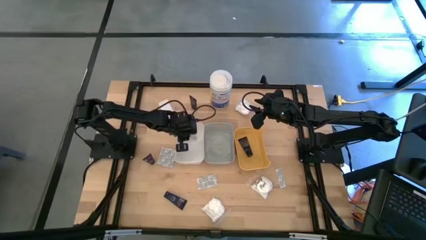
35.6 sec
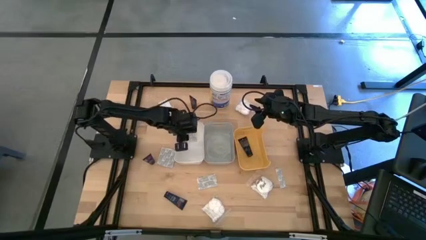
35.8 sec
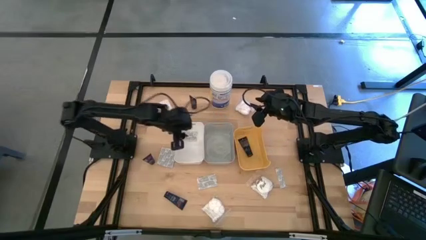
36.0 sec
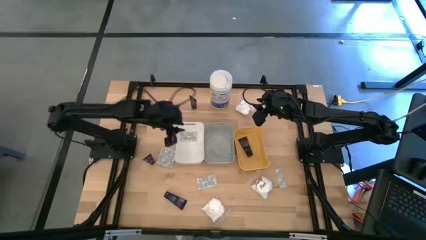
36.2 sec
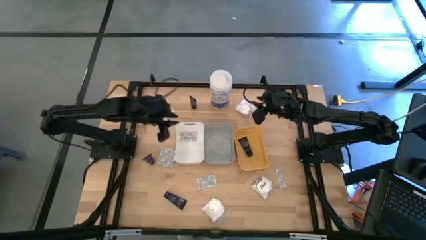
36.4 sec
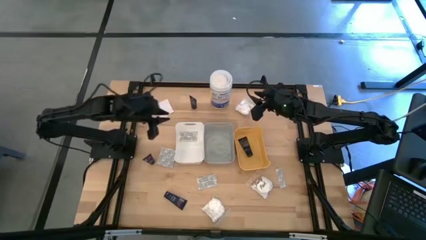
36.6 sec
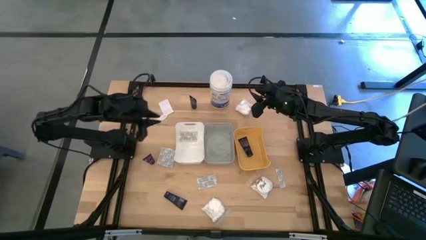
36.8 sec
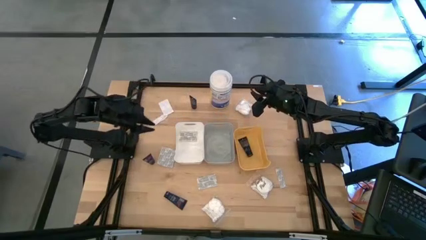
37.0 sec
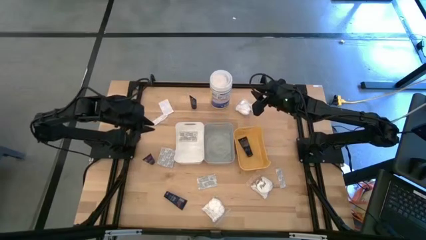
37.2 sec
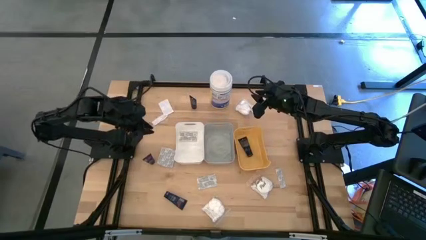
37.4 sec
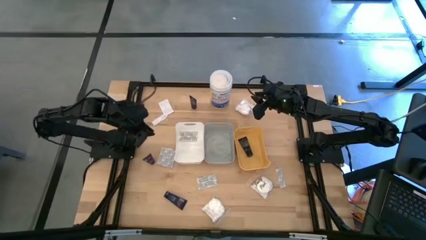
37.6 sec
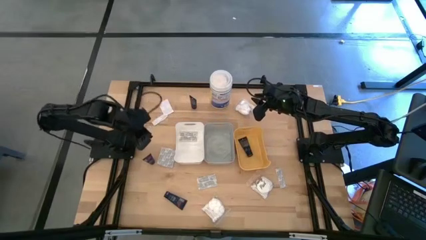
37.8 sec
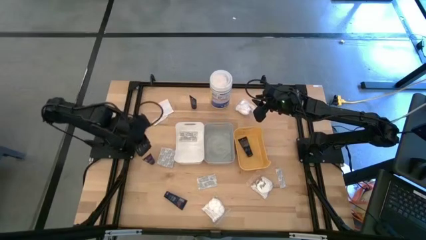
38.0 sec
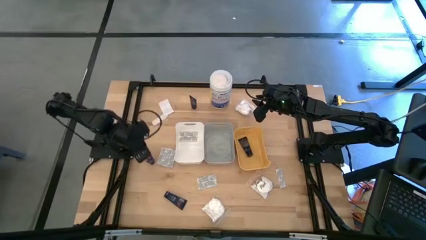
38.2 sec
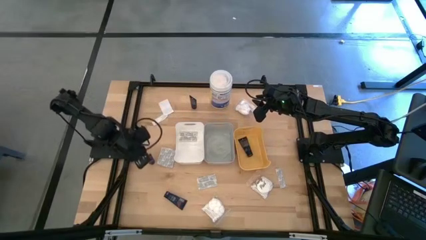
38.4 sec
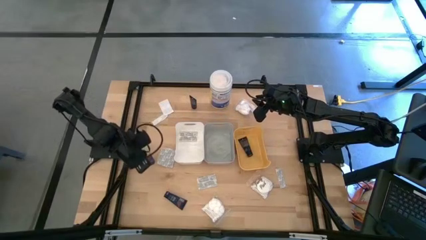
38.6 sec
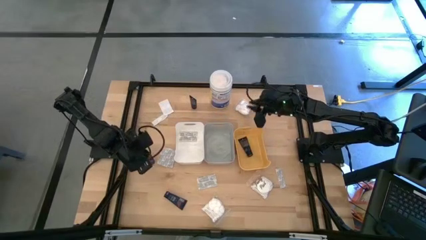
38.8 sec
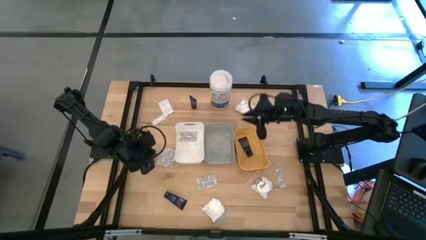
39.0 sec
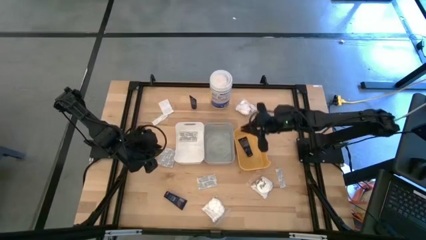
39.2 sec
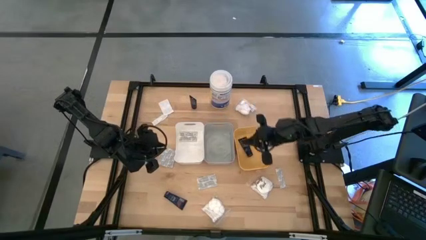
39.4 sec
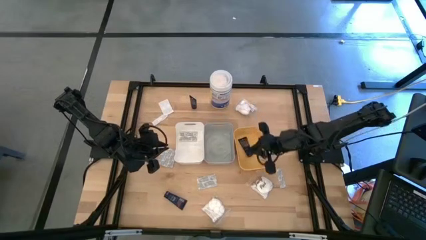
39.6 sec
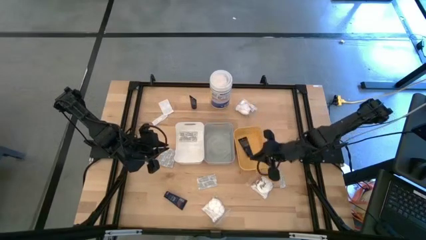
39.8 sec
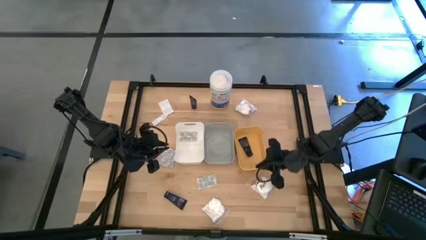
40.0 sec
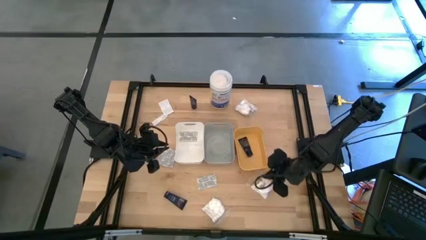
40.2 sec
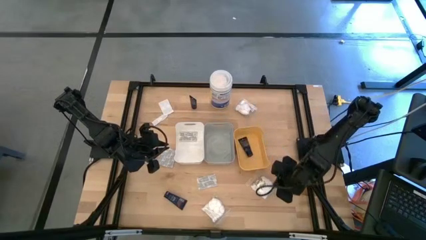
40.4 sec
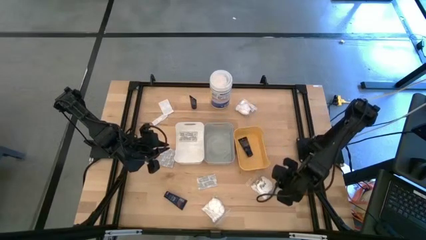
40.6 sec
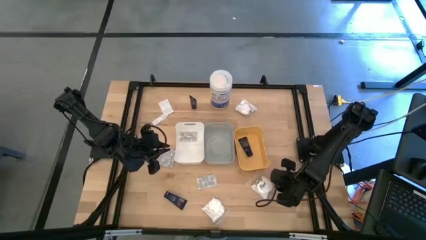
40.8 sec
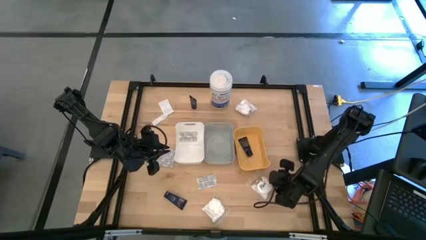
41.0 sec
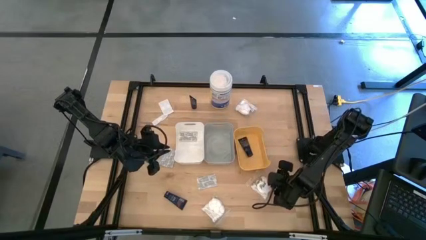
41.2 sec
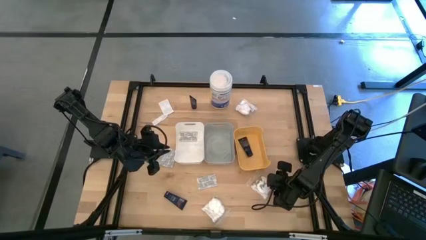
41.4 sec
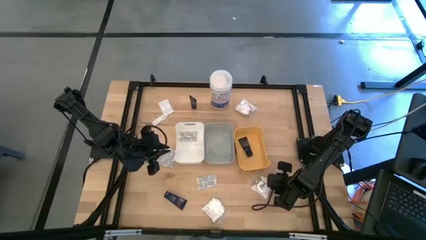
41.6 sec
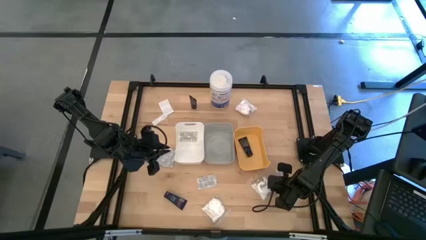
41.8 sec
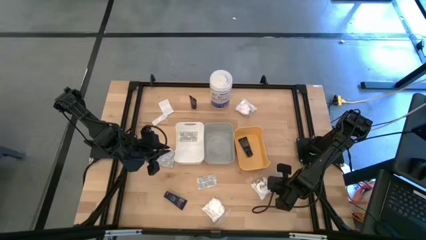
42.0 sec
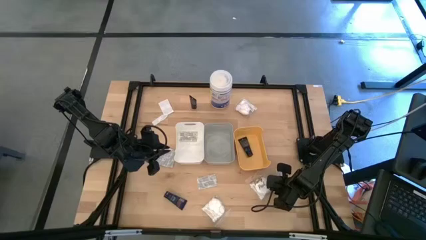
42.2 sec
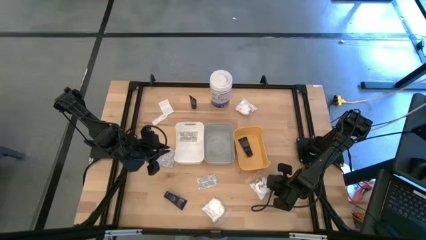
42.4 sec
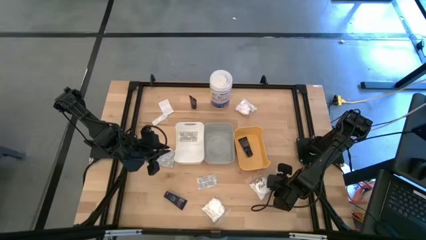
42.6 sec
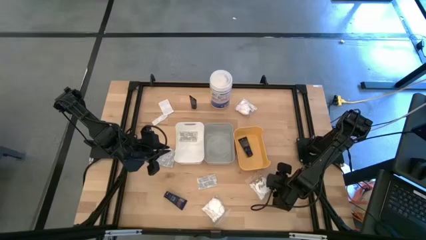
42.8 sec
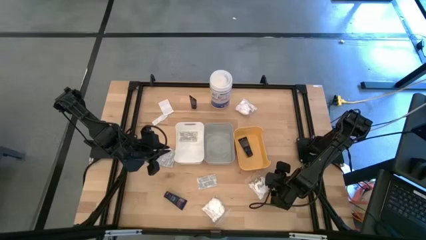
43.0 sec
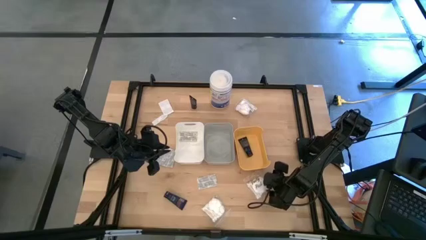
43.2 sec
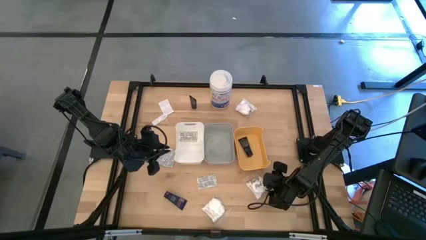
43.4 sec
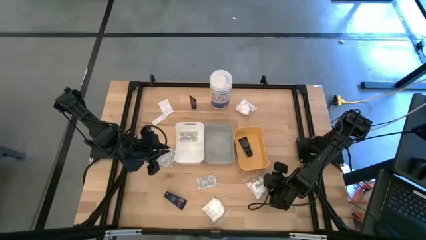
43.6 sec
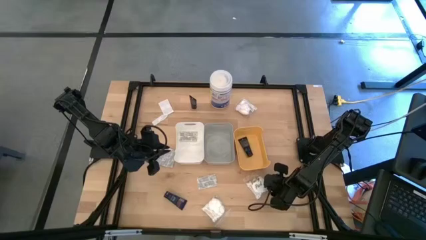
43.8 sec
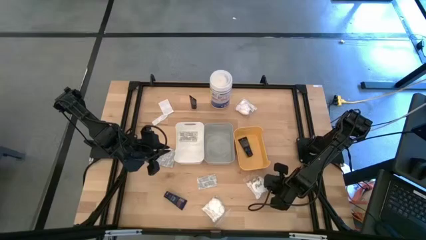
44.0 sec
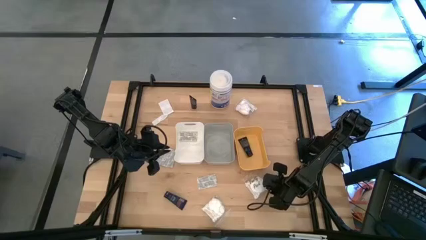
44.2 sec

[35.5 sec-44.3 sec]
Task: Pick & Place Travel size toiletries
Put the white cotton pack into the gray bin

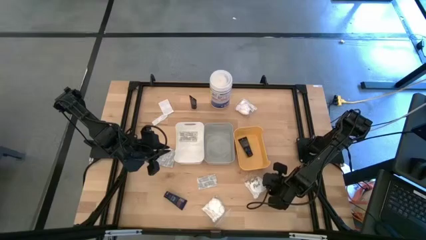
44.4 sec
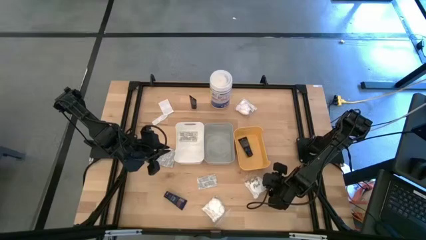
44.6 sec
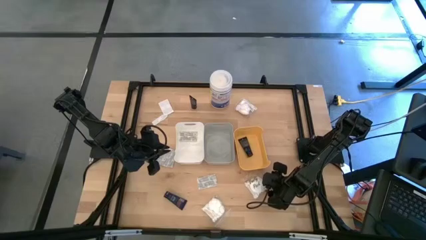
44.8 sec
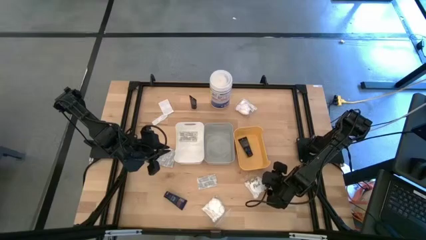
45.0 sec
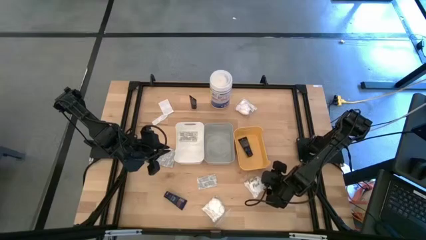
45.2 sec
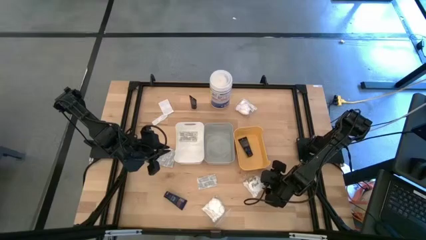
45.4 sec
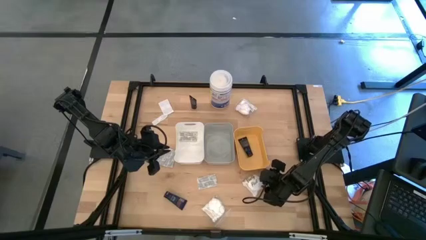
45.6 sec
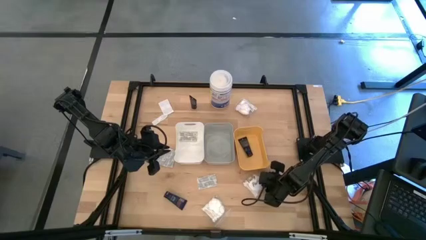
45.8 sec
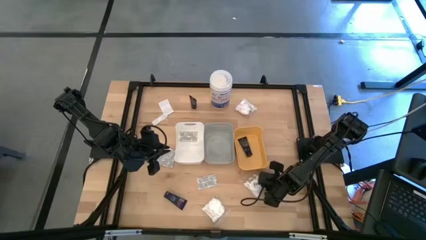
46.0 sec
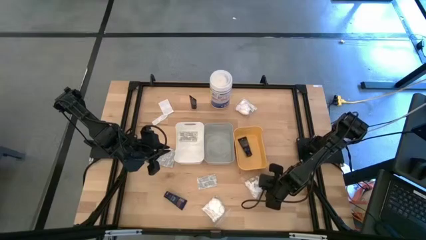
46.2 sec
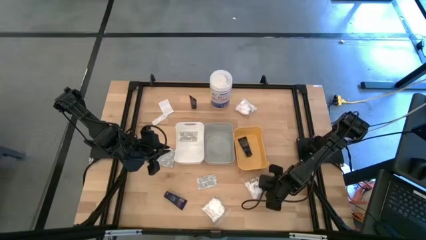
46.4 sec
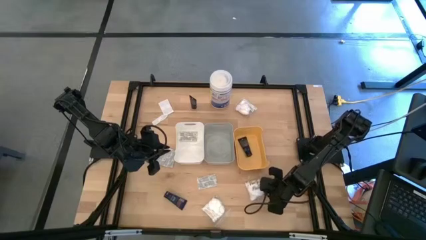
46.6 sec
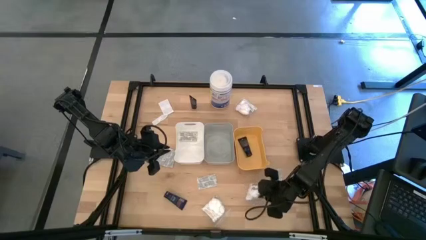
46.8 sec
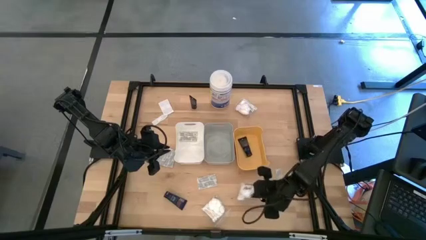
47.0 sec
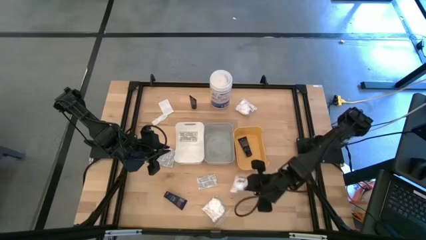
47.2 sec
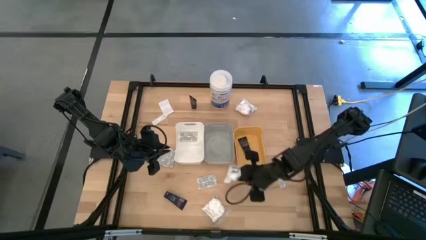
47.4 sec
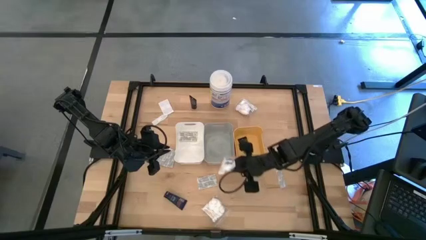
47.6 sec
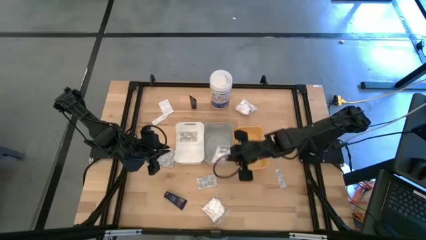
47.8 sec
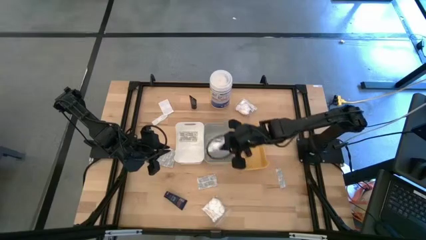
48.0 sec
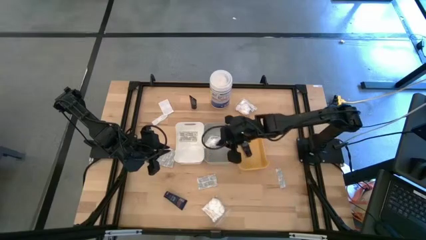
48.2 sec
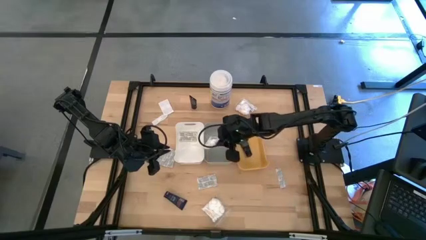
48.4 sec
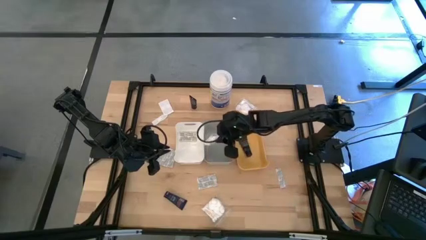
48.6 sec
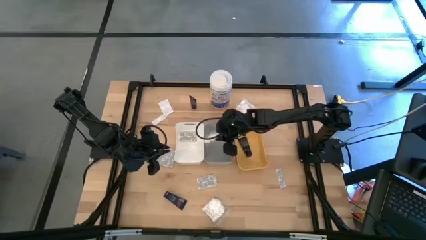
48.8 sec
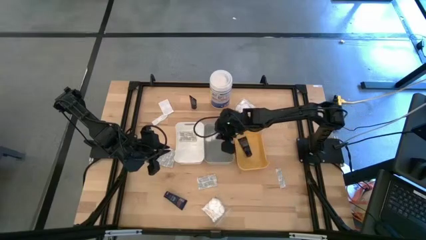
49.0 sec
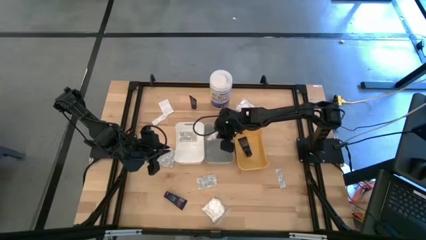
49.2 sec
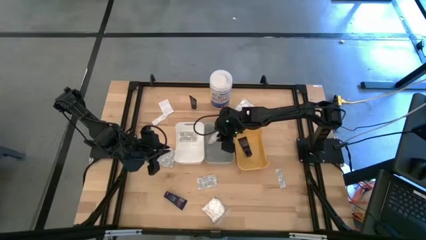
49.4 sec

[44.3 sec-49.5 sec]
Put the white cotton pack into the gray bin

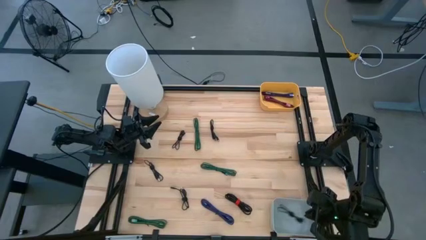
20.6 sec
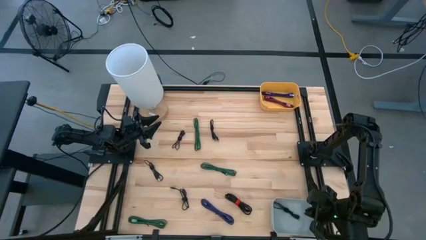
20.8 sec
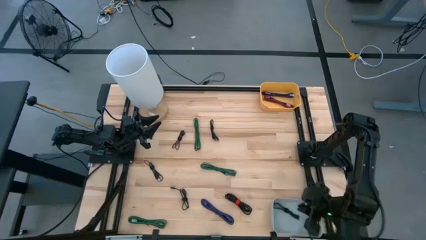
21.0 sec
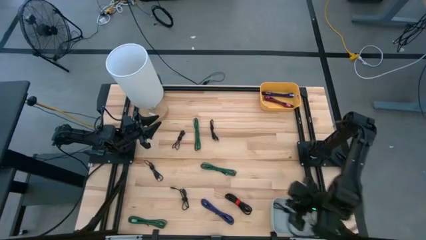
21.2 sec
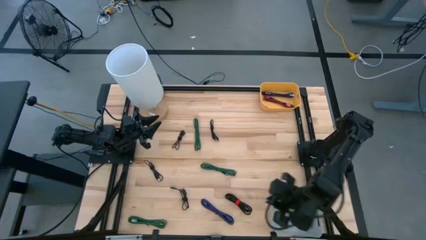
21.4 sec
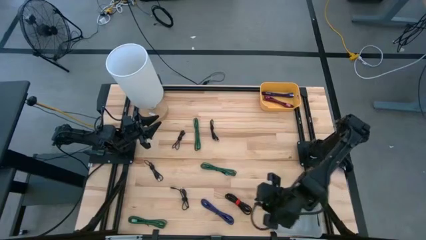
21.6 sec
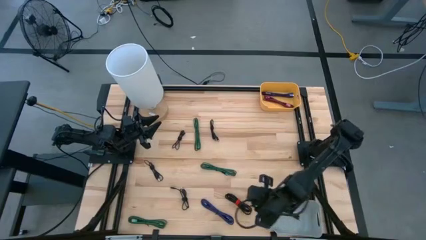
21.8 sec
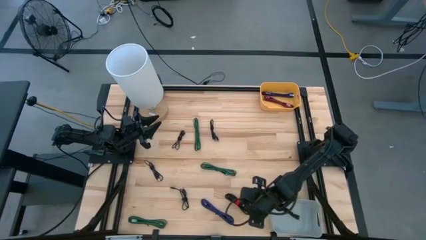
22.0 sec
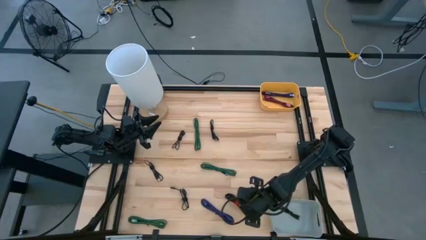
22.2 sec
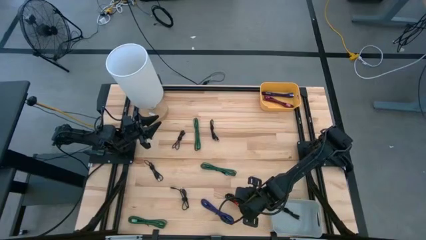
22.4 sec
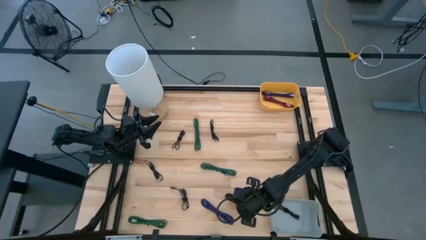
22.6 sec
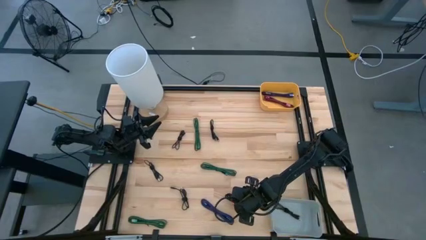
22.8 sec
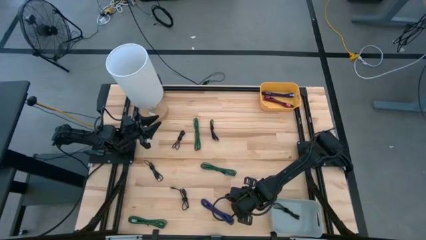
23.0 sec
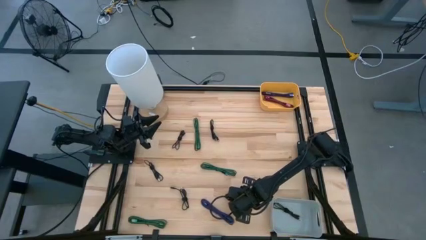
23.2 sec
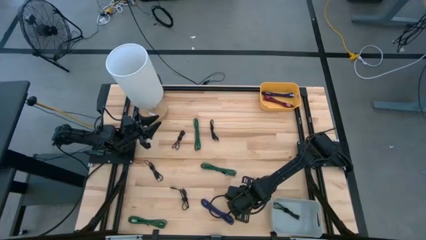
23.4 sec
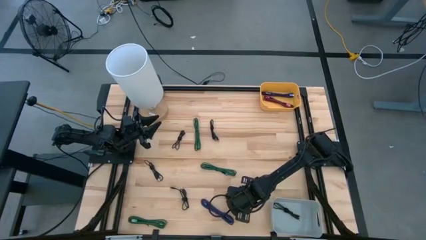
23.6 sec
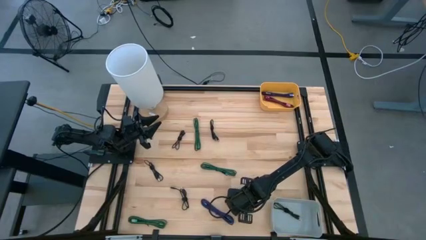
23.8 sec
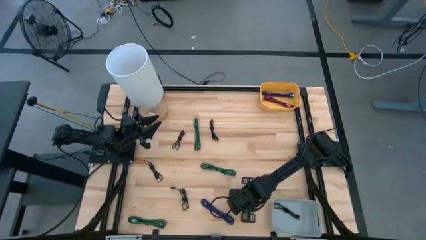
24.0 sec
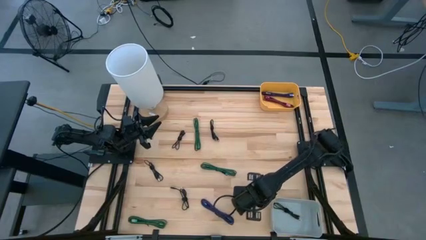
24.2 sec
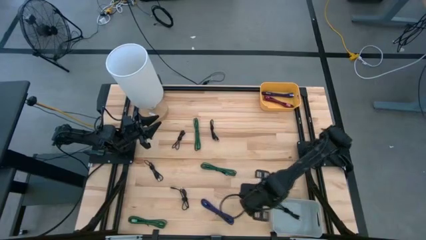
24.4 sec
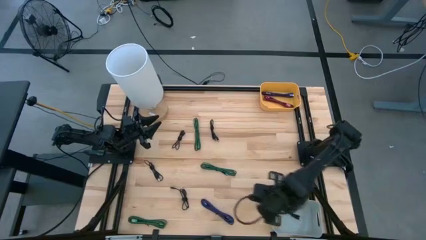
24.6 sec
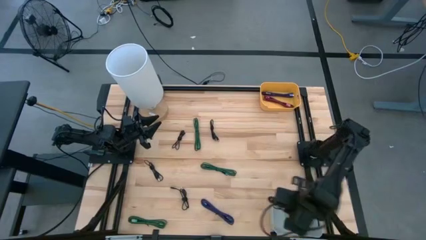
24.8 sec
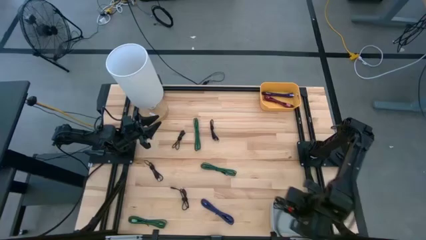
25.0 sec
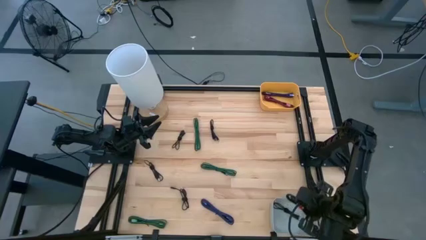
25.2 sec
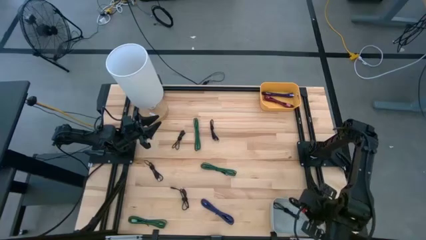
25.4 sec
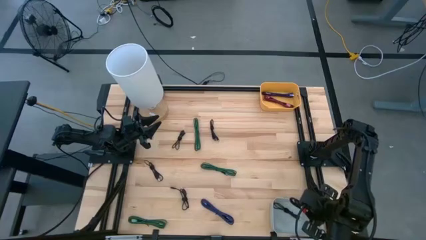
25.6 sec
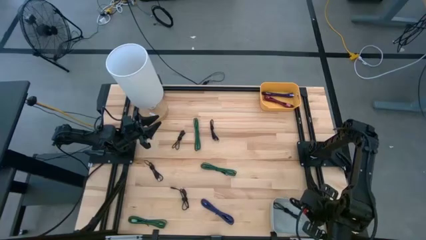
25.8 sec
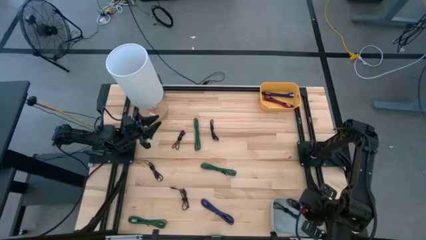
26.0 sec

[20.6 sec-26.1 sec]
Task: Pick & Place USB Port
Put the black USB cable into the gray bin
